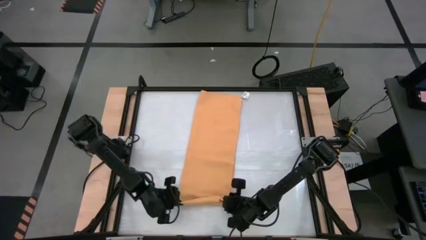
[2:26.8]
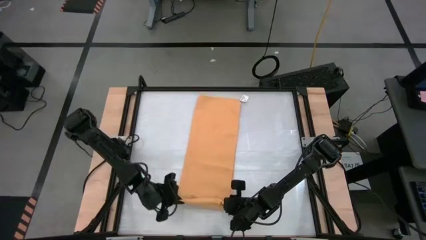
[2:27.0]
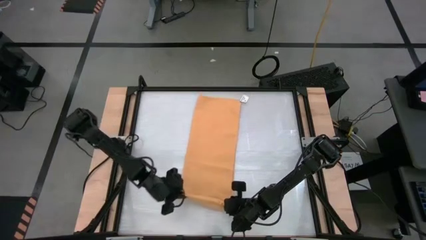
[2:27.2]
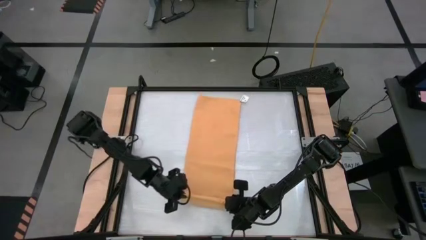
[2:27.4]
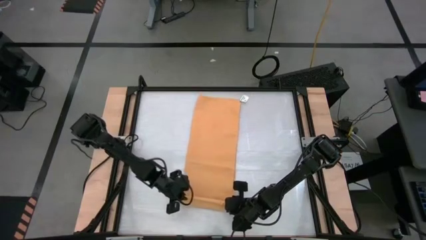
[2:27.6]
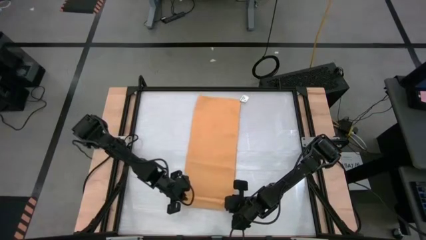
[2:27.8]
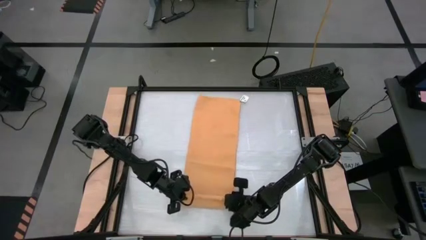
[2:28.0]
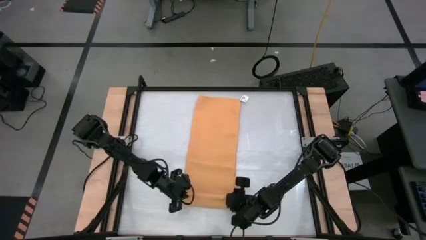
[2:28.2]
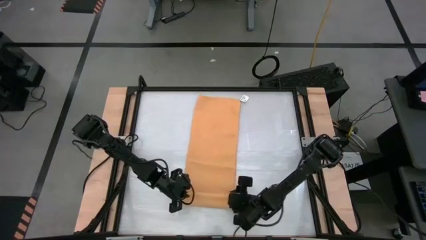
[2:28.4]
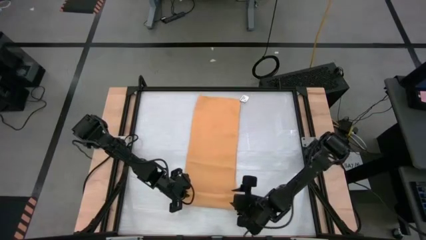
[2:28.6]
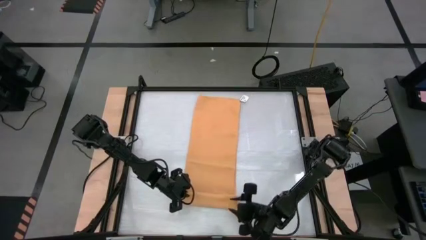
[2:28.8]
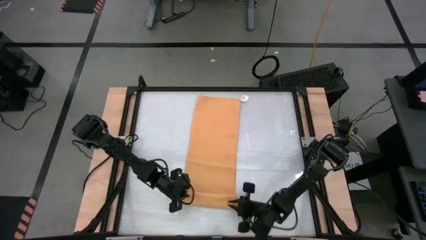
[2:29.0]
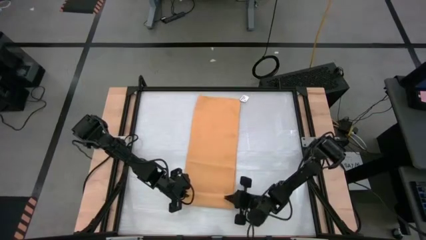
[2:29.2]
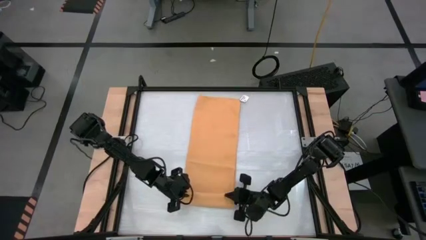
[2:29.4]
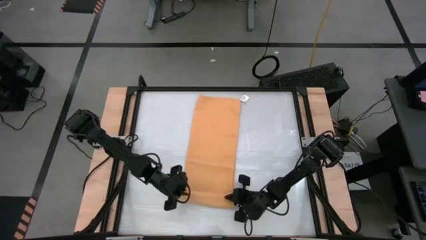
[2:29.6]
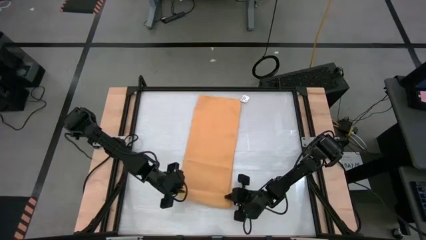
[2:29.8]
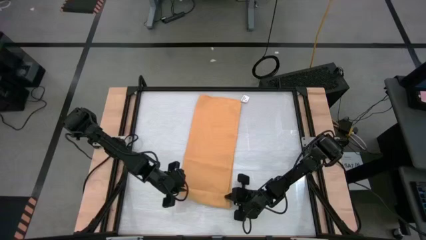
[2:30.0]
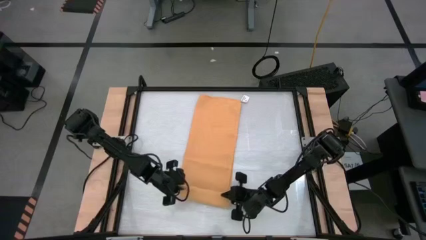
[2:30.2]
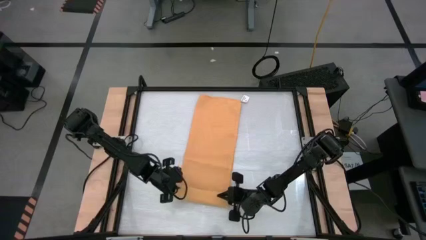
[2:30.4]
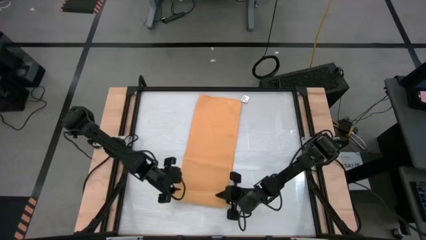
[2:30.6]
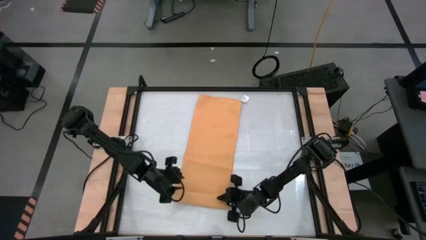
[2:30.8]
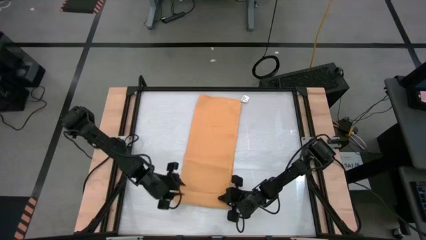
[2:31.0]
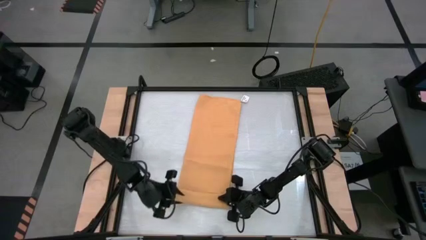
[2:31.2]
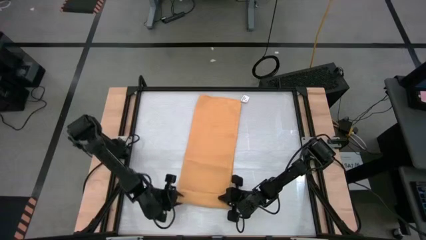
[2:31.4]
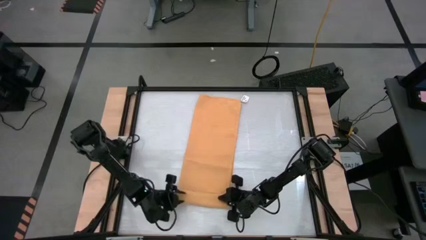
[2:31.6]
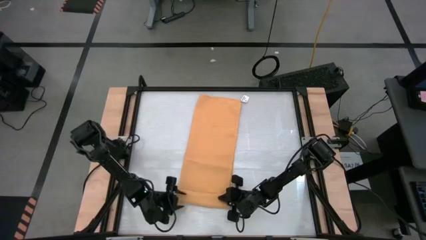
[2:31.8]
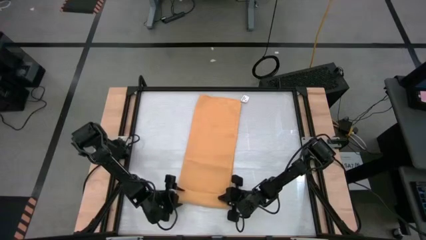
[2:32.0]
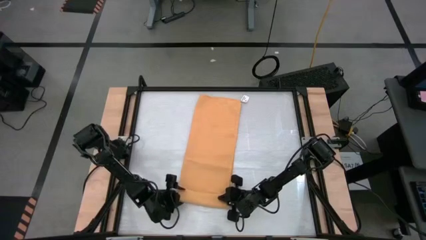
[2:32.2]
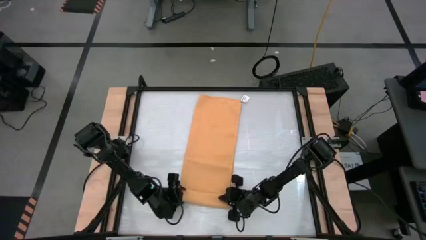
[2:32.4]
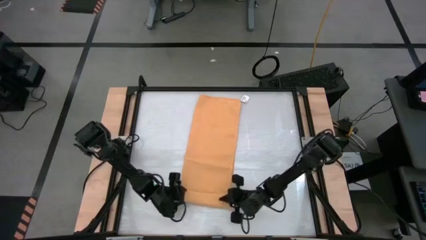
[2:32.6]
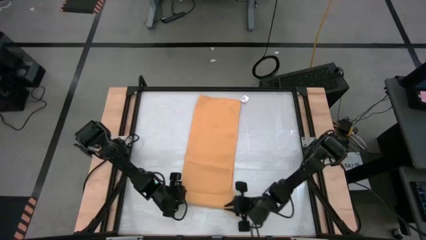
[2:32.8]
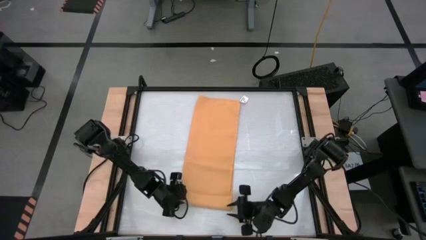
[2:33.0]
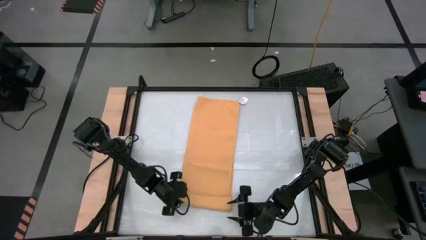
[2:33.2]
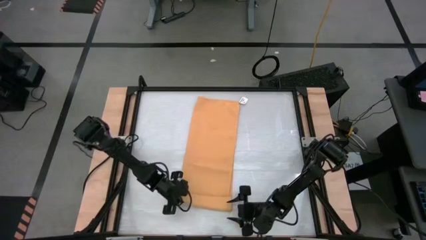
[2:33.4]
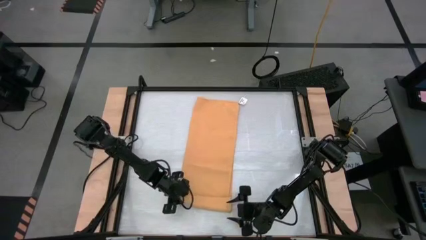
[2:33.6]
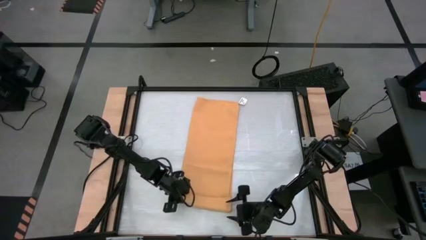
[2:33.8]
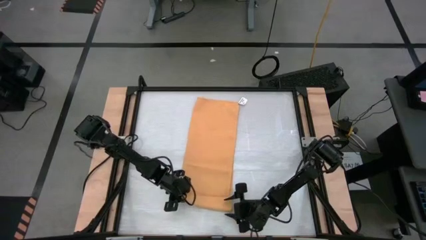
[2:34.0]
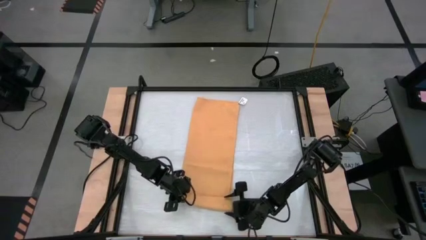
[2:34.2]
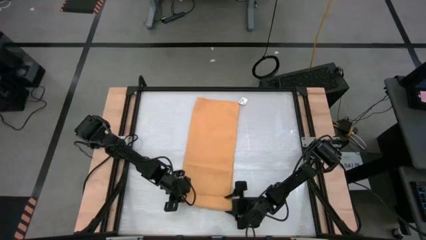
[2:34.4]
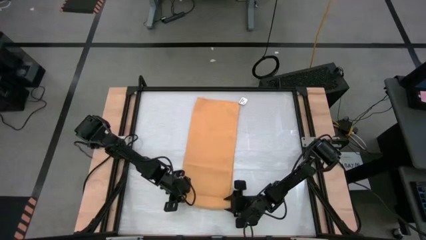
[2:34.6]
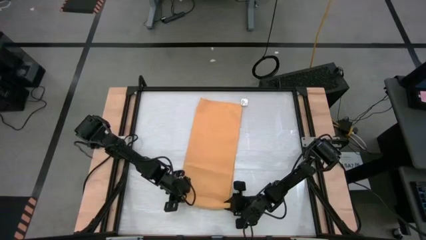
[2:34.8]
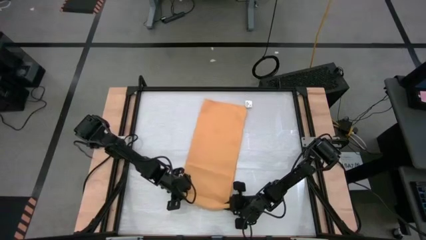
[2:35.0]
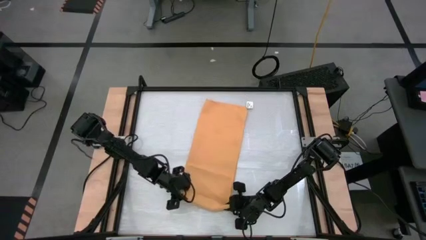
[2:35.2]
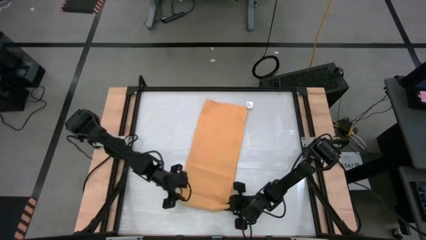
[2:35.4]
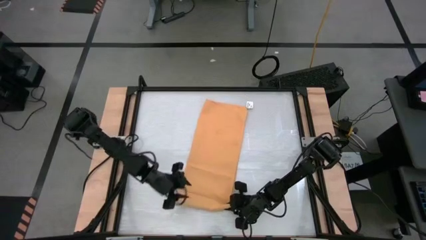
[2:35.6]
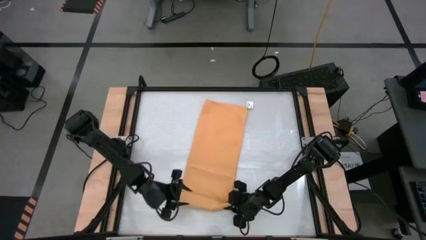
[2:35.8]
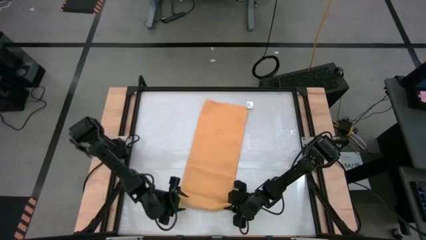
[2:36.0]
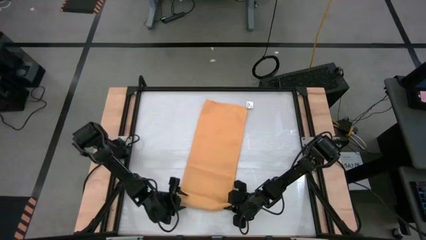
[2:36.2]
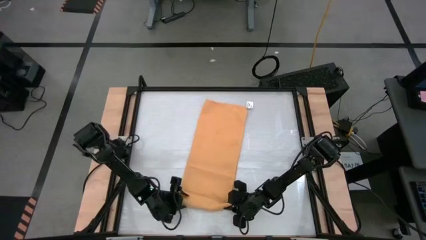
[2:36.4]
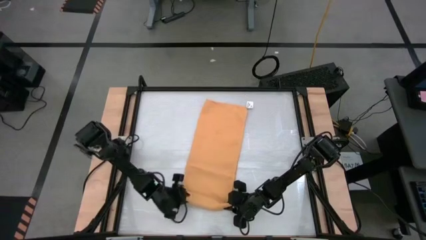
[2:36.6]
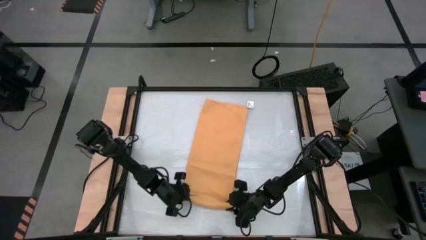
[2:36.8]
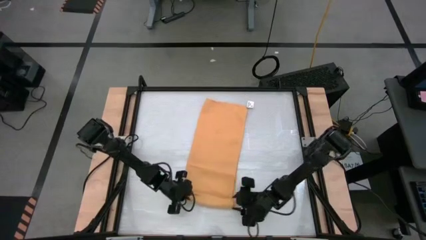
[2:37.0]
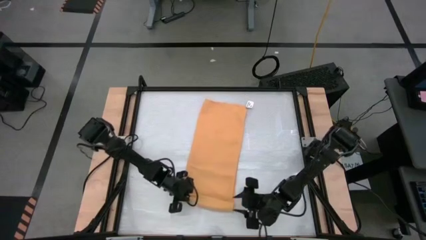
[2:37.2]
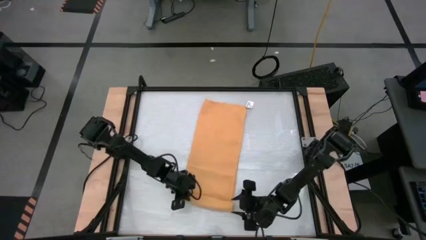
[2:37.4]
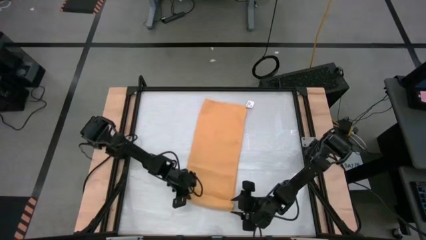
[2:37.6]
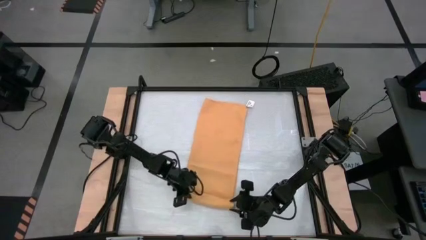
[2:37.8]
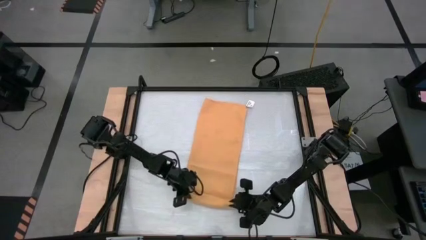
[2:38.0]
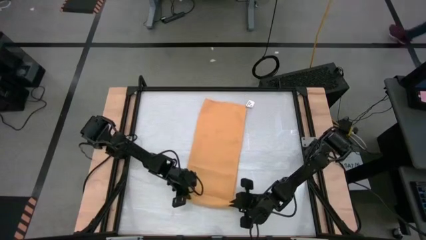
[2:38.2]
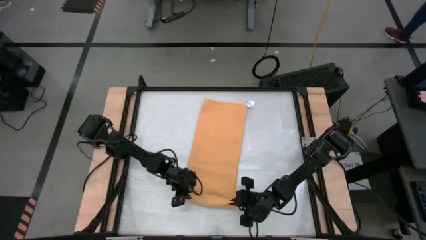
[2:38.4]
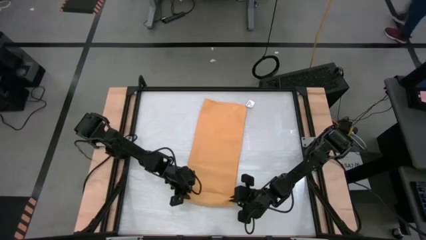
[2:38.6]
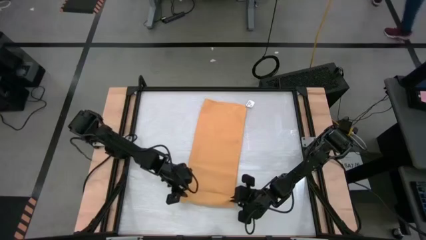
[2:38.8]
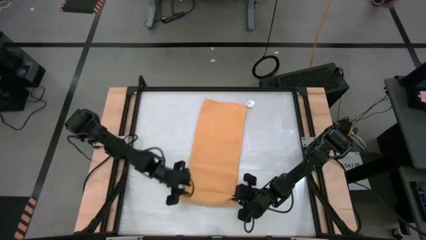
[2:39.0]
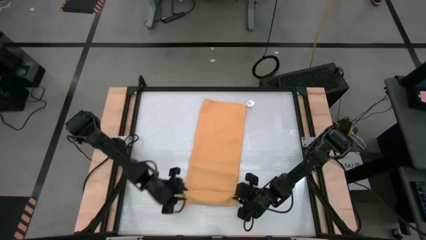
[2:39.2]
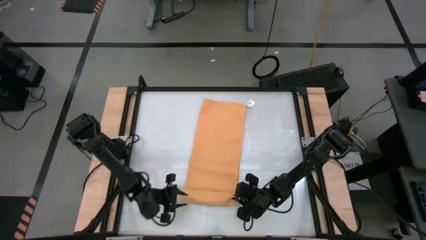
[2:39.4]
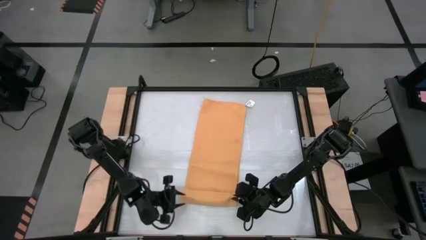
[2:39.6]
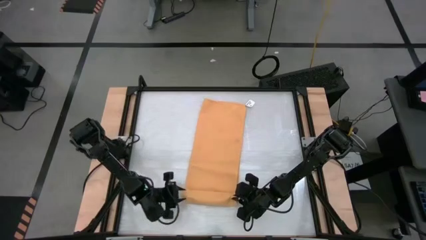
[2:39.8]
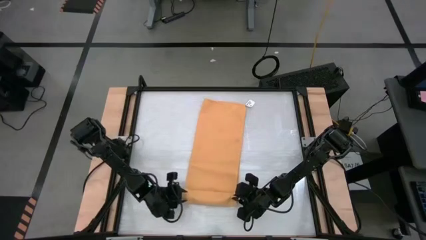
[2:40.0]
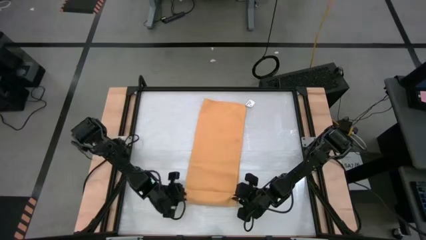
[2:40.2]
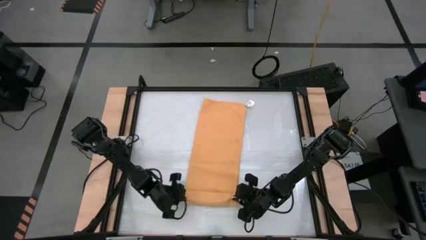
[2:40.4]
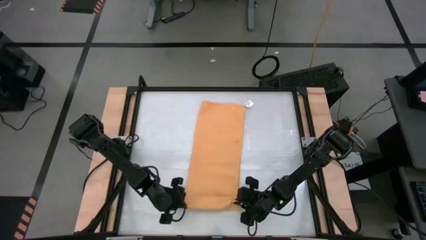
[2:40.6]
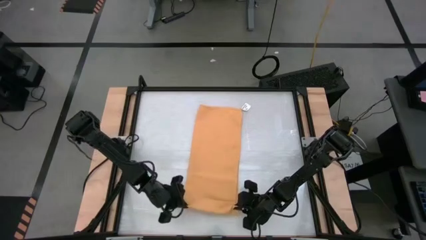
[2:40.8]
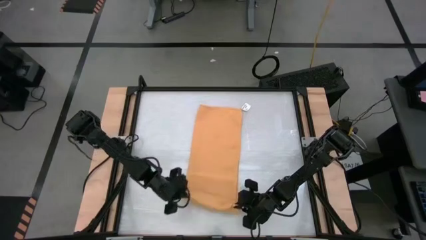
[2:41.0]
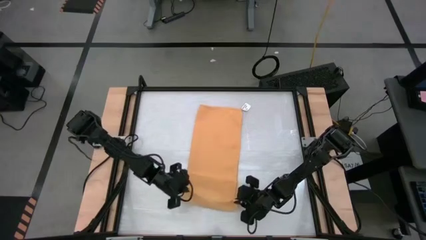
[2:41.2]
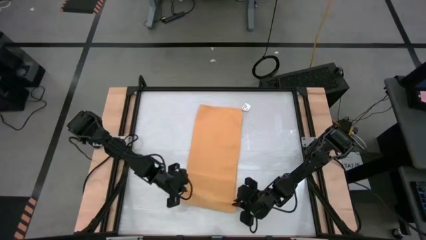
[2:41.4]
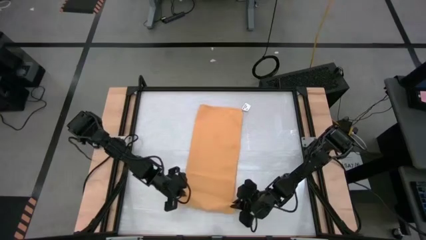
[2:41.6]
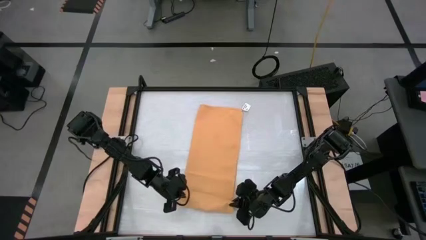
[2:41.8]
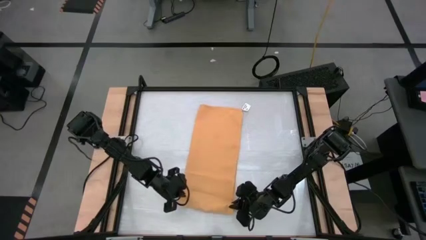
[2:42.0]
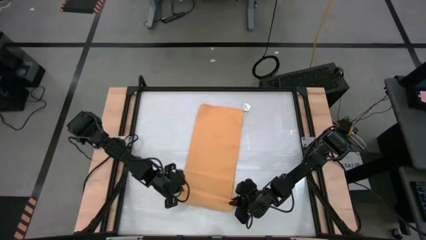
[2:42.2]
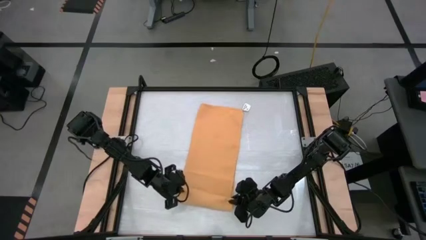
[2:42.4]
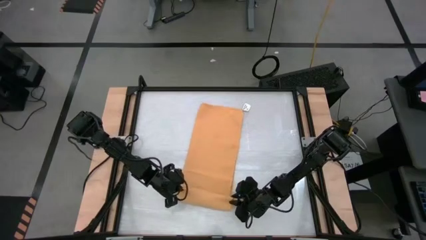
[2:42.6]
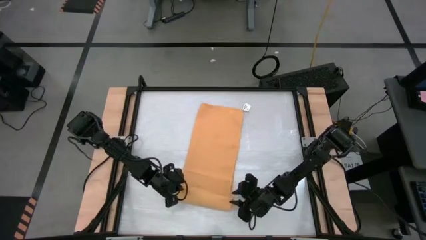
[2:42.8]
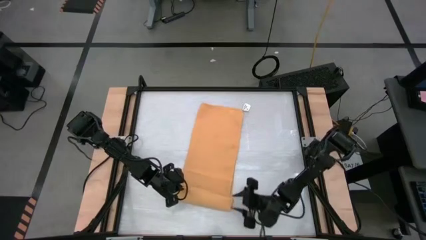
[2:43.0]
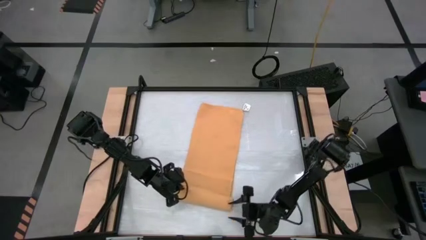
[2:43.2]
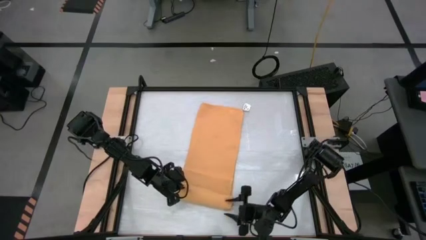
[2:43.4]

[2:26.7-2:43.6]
Task: Roll towel into tight, uniform cylinder
Roll the yellow towel
